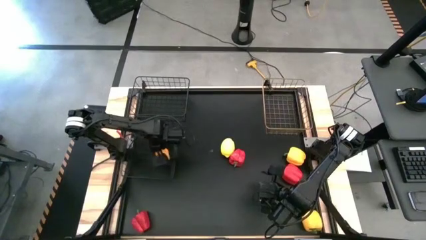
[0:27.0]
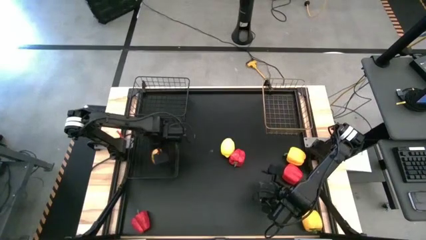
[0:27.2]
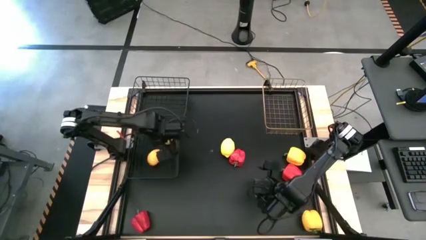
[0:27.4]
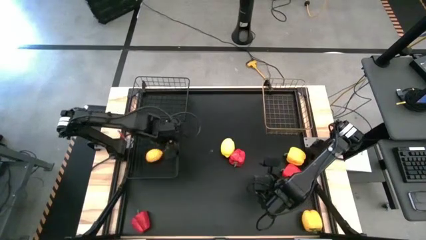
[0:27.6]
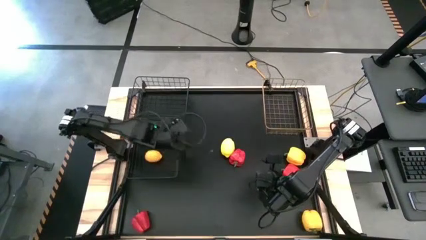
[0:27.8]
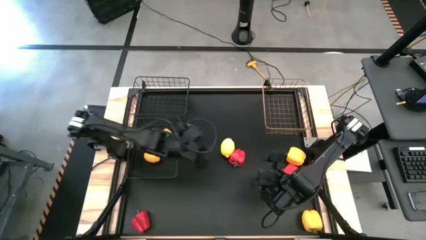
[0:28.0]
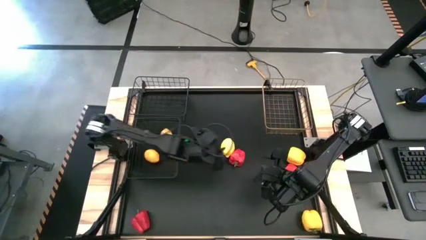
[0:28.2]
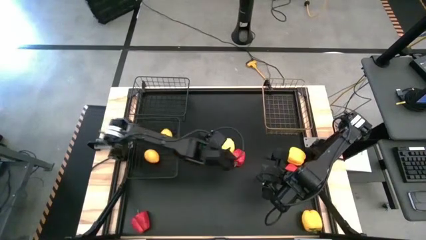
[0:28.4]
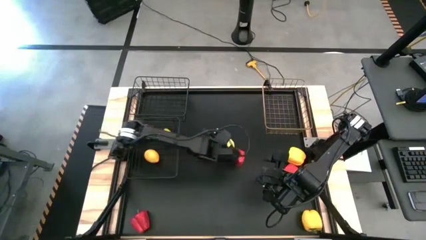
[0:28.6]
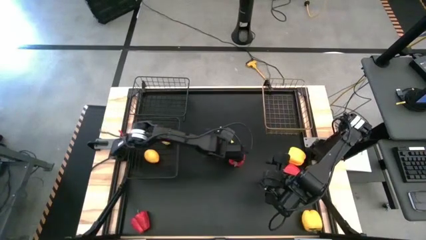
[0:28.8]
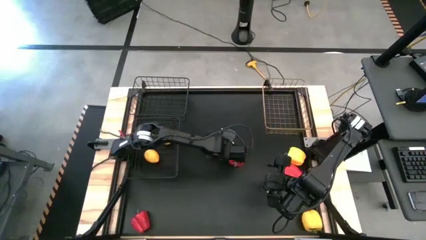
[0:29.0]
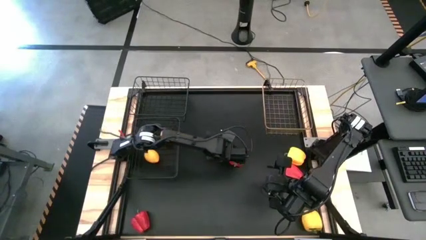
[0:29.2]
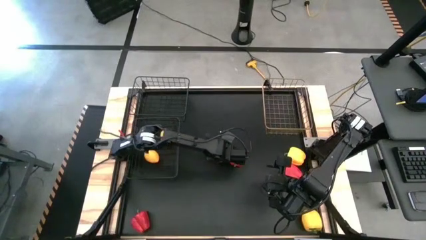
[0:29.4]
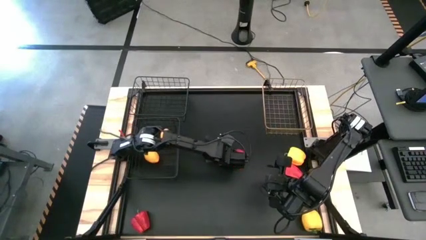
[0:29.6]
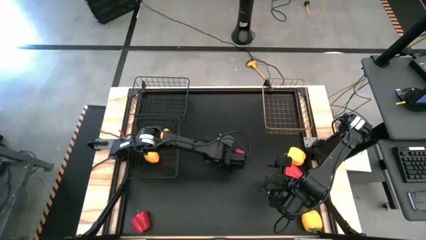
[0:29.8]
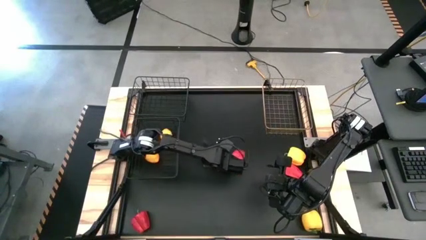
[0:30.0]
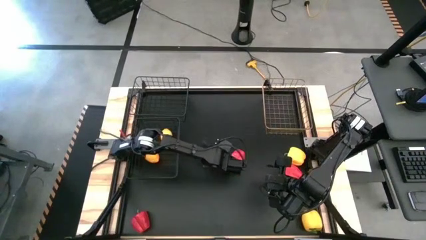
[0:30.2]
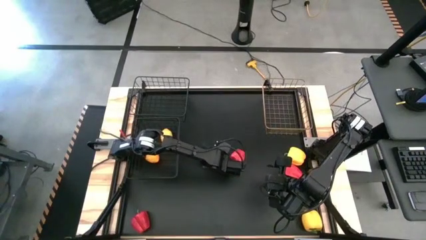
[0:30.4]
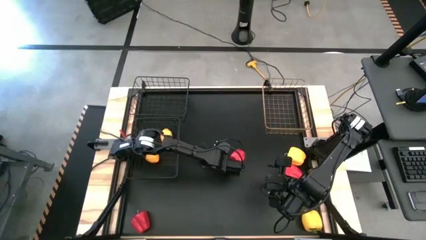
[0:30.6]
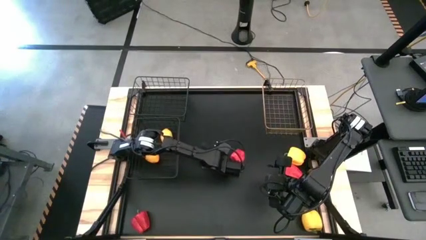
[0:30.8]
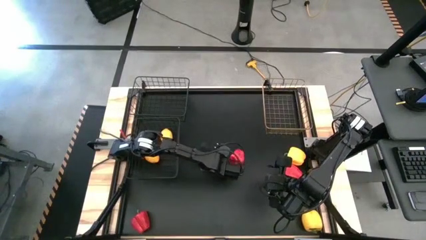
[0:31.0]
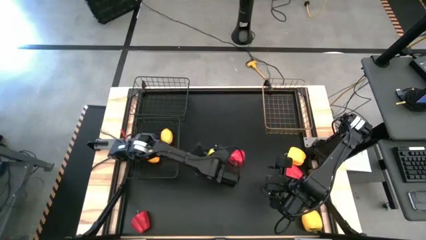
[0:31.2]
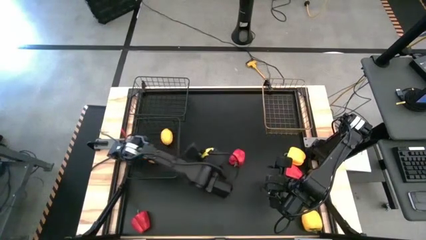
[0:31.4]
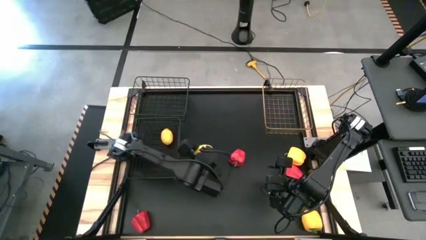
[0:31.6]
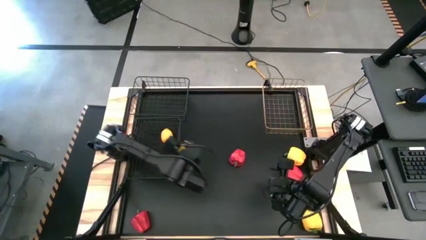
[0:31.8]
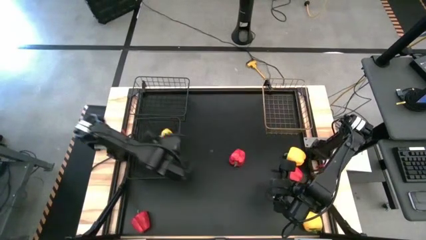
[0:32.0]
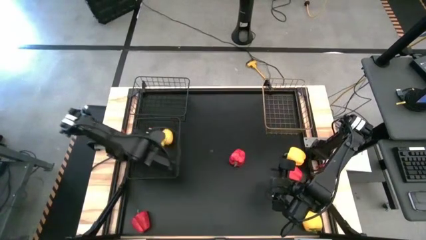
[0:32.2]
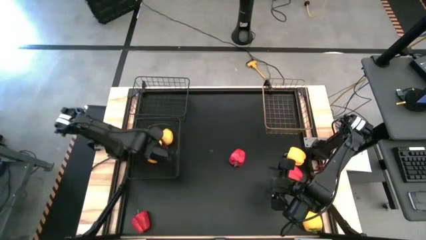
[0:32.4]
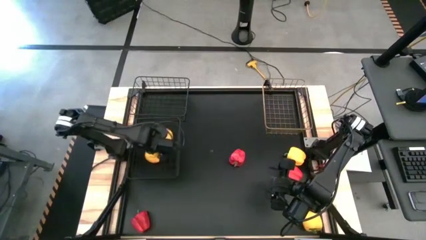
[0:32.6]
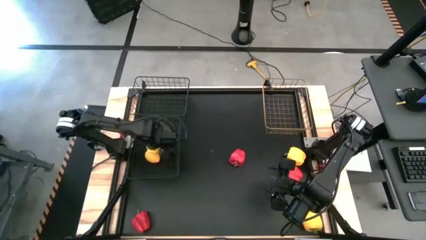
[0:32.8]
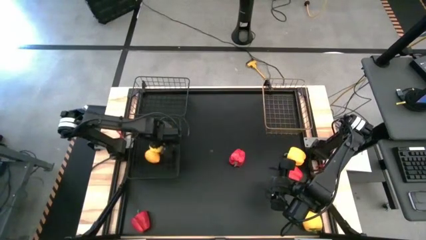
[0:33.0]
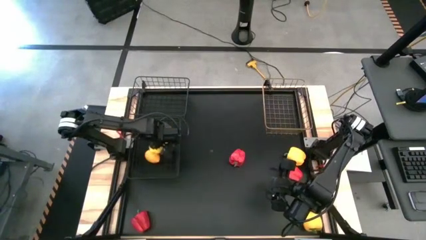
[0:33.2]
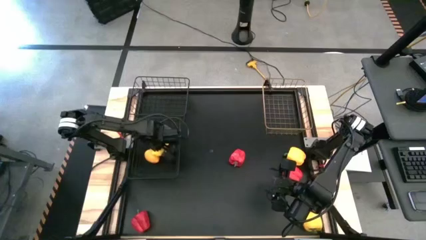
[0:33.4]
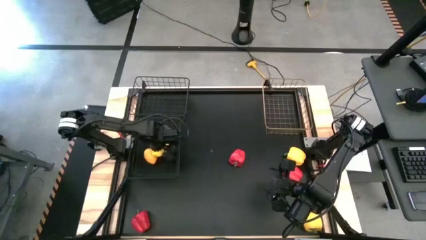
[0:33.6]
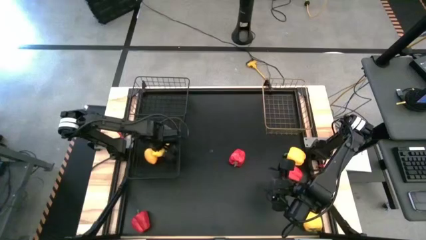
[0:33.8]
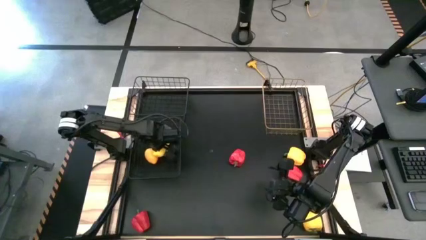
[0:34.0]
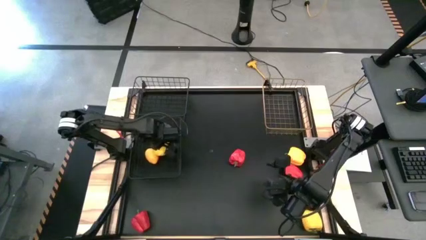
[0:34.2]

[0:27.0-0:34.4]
Task: Sort produce into baskets
Put the lemon into the bottom black wire basket

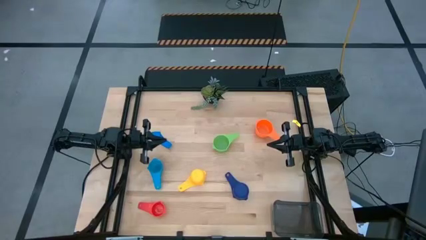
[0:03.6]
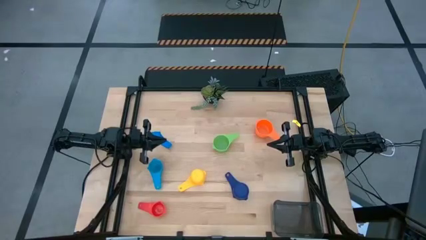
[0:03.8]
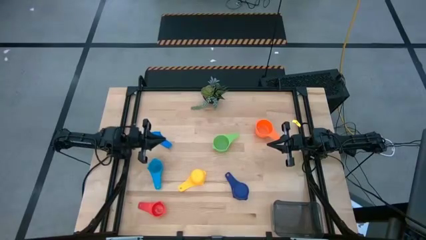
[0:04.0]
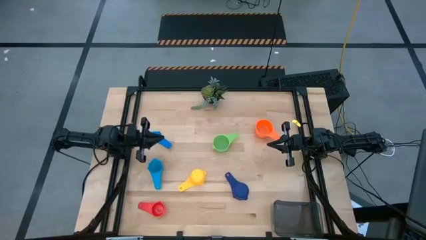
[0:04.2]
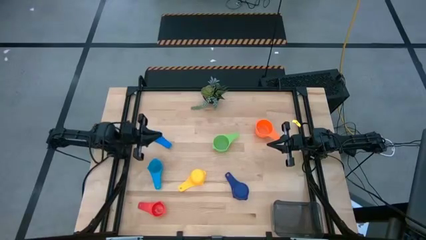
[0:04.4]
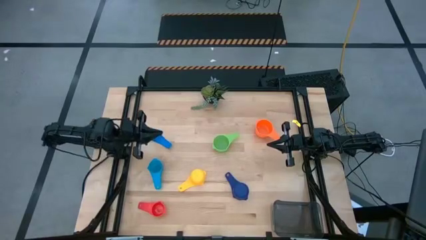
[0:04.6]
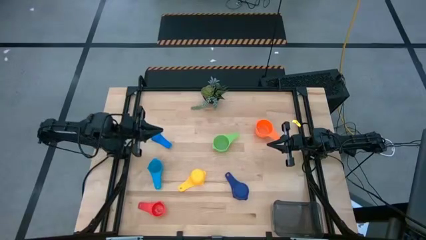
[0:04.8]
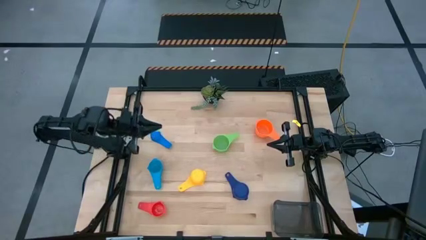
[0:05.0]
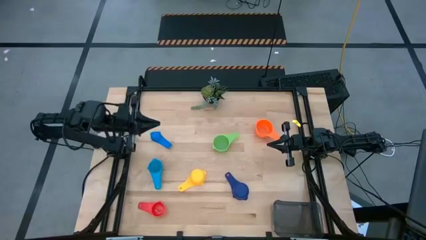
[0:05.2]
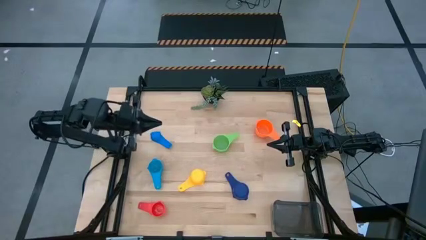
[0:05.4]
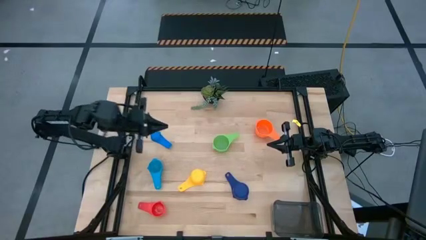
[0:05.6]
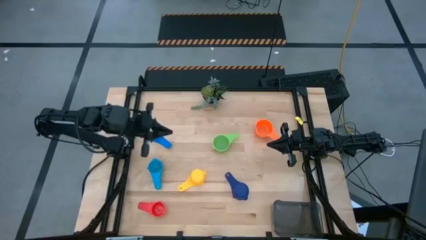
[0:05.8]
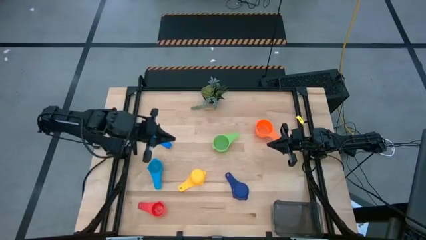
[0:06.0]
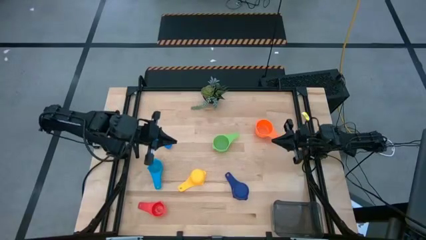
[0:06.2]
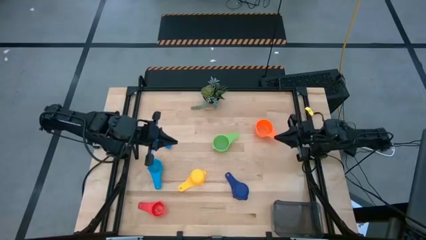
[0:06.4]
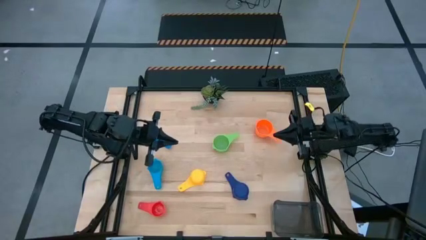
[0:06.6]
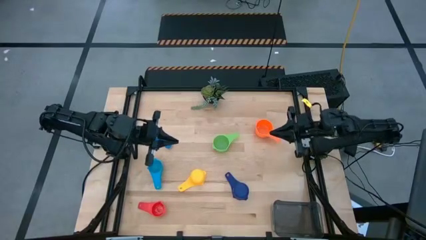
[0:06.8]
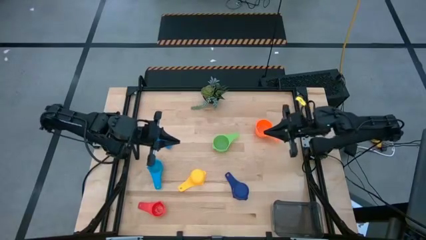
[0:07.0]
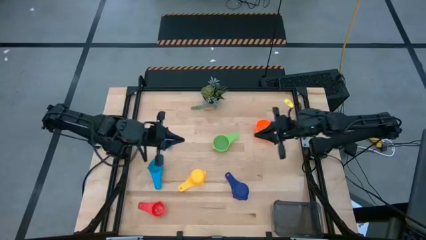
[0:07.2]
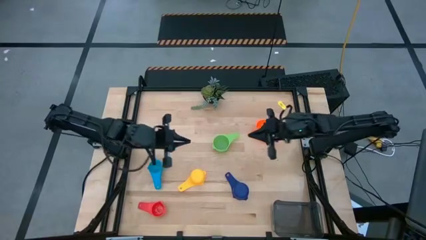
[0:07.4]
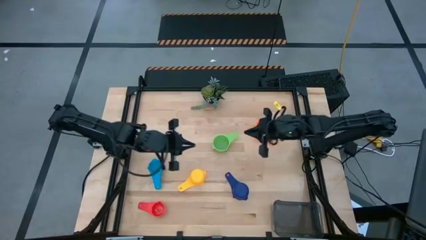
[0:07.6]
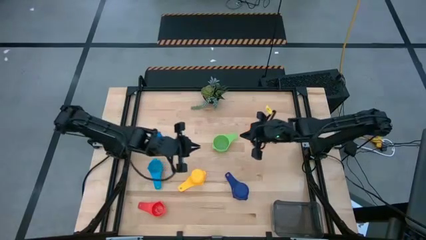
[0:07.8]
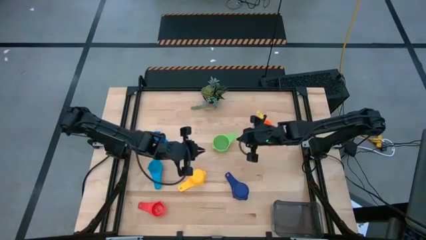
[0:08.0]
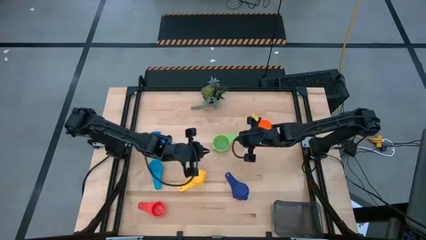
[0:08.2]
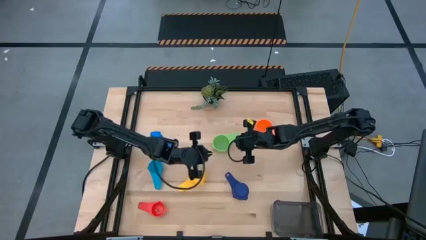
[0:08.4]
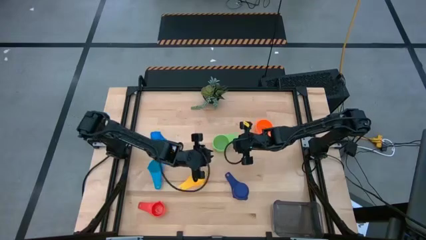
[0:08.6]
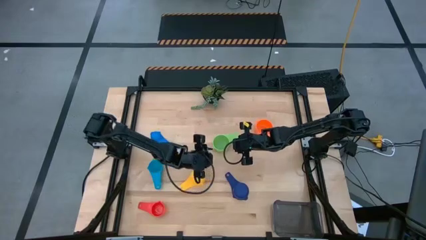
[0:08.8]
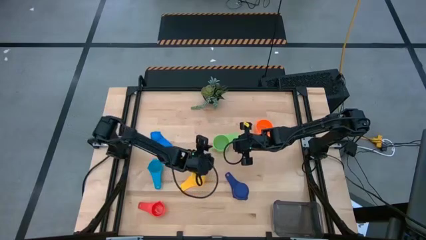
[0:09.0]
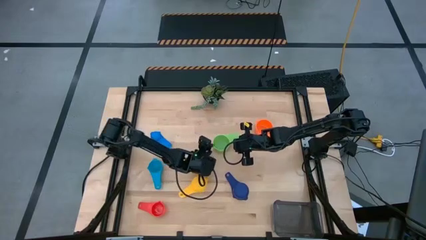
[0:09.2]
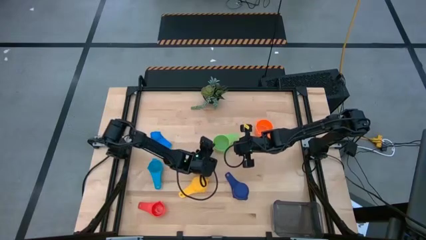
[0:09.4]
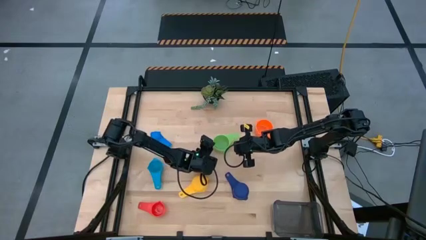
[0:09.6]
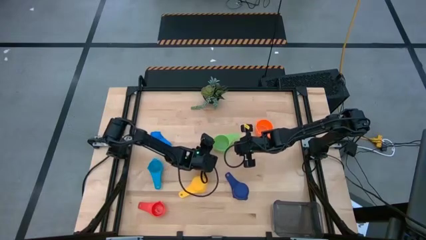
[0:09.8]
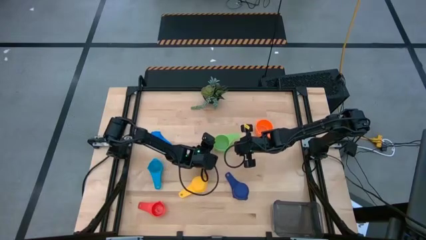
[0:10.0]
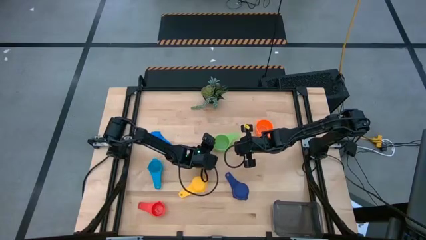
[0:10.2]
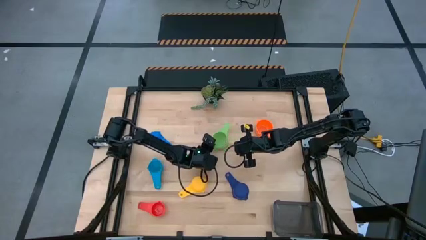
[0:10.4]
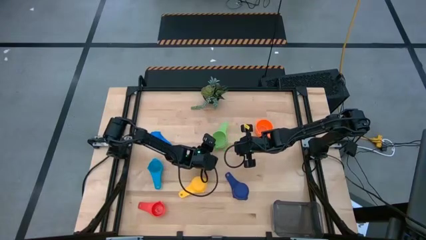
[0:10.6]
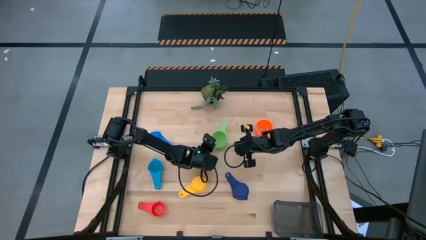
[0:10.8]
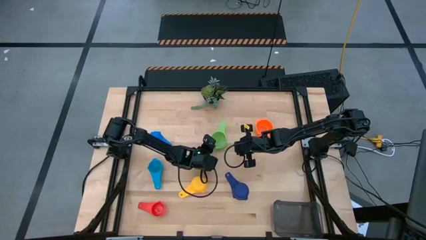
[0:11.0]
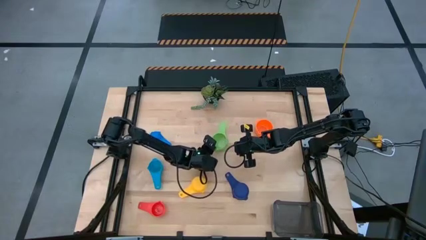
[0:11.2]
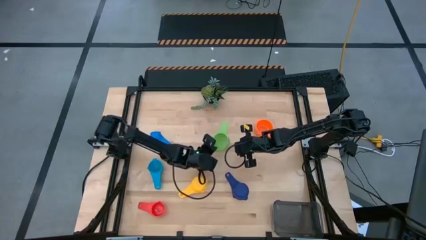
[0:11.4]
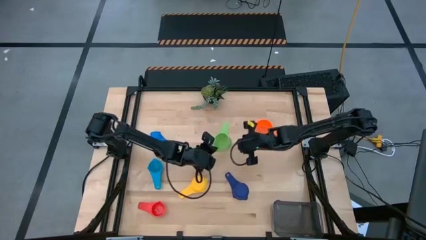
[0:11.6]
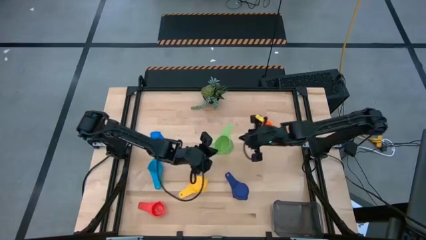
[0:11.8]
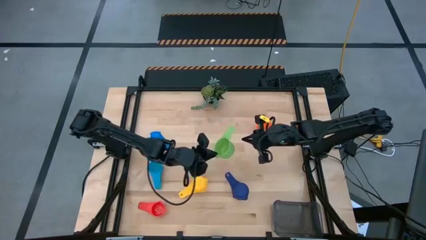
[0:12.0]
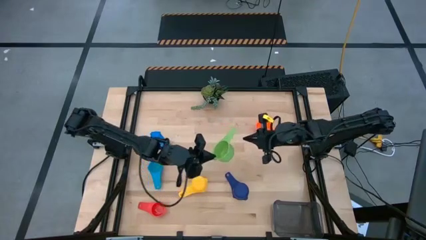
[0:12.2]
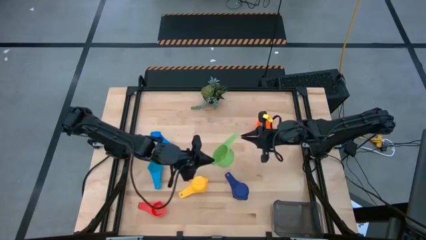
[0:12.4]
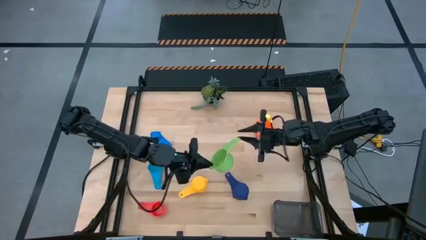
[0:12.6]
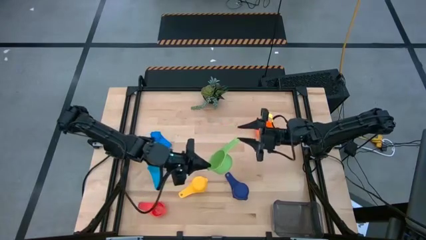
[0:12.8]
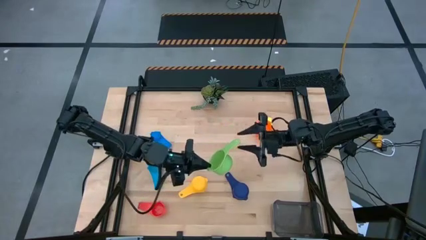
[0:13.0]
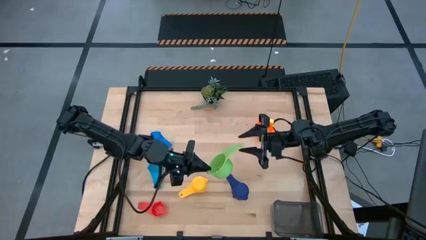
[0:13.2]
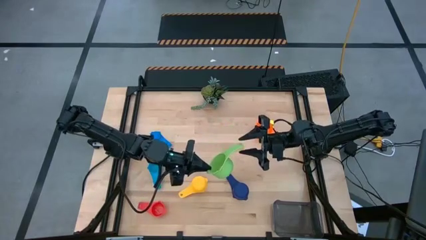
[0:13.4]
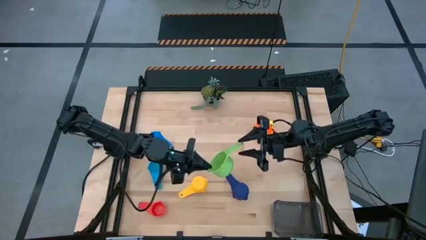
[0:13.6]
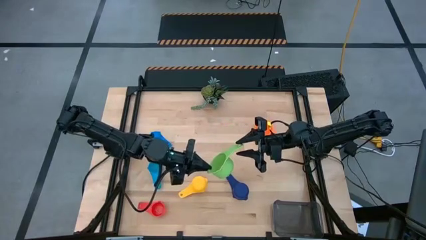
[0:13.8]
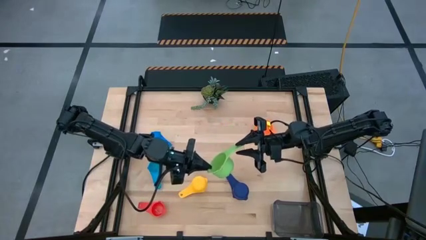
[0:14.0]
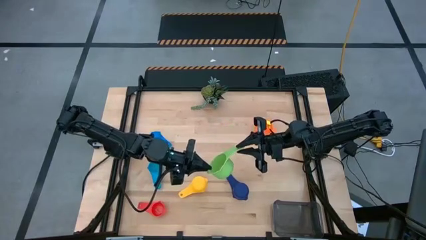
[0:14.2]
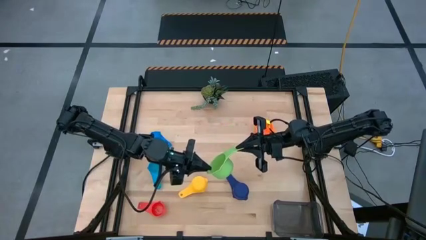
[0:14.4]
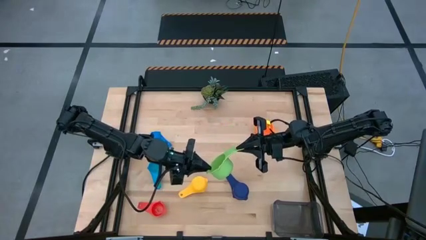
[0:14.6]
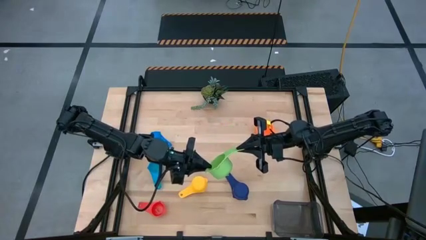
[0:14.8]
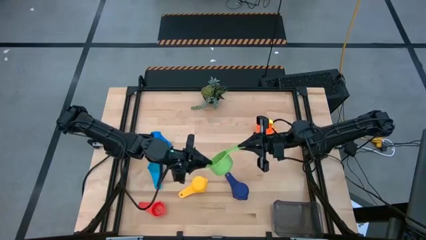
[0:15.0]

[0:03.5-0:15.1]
Task: Nest measuring cups in basket
Stack the green measuring cup on top of the orange measuring cup
